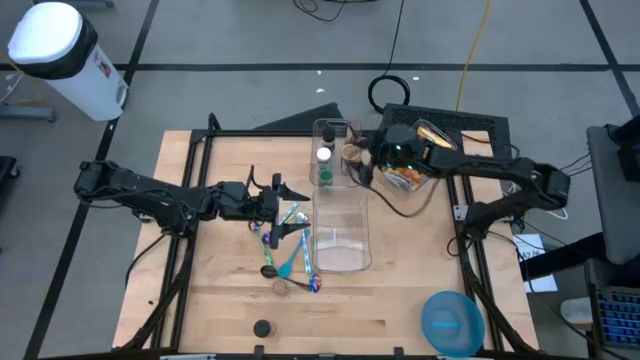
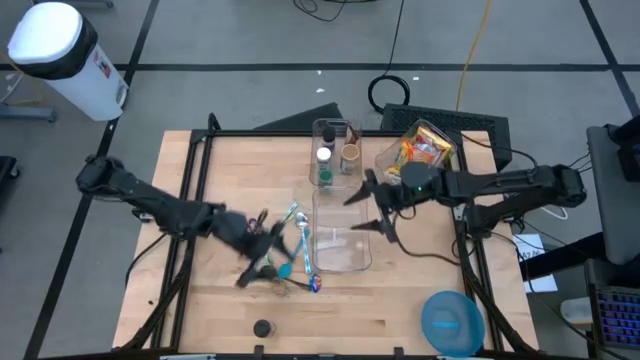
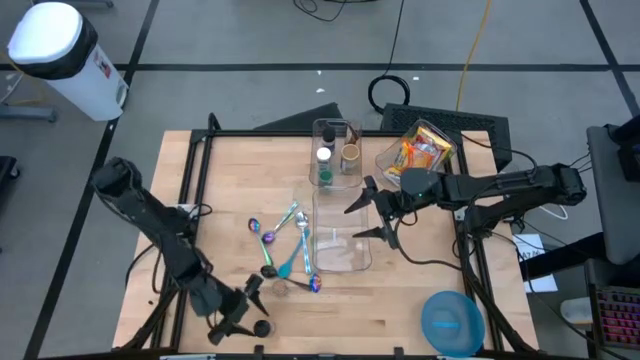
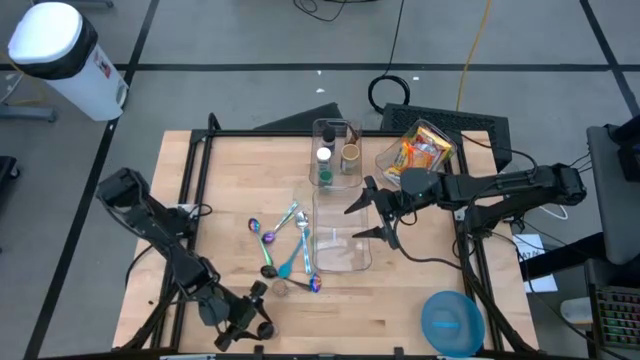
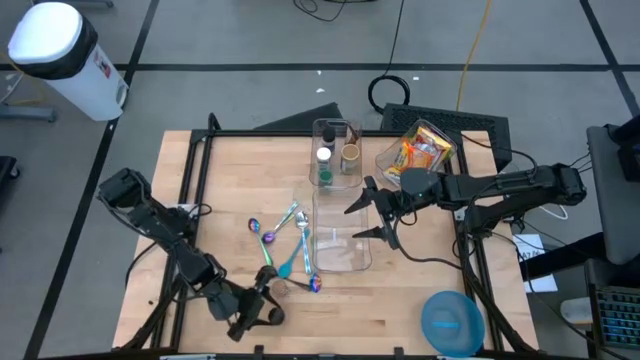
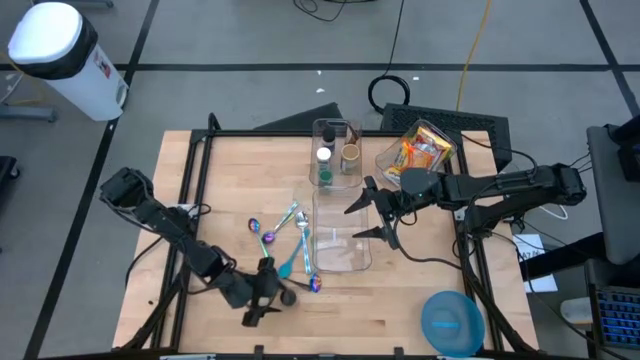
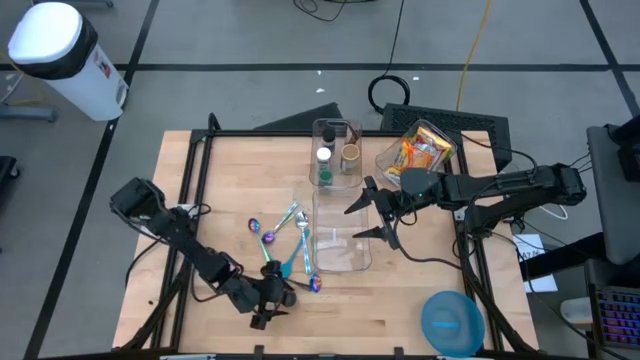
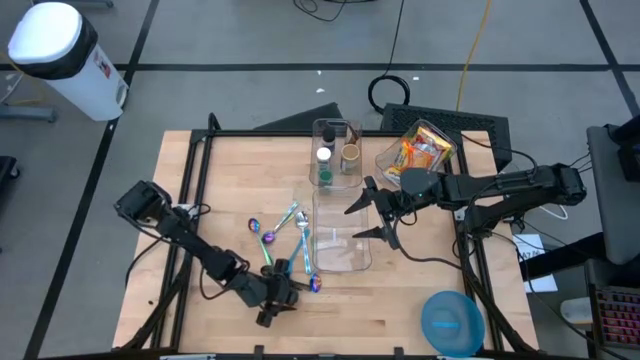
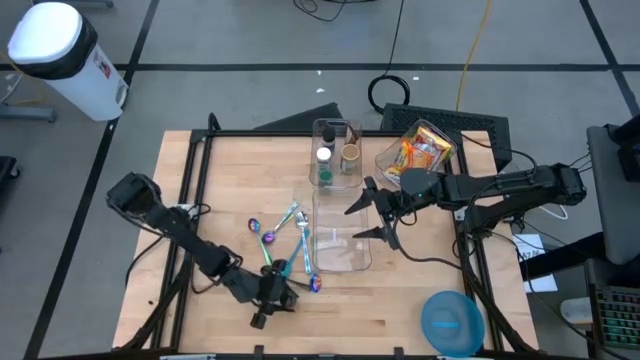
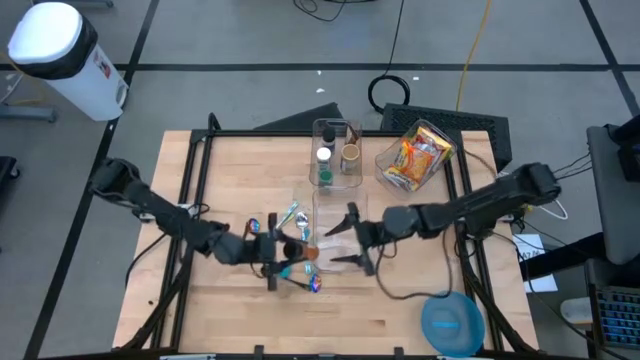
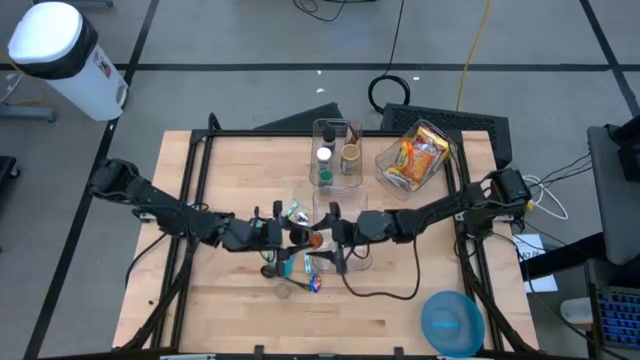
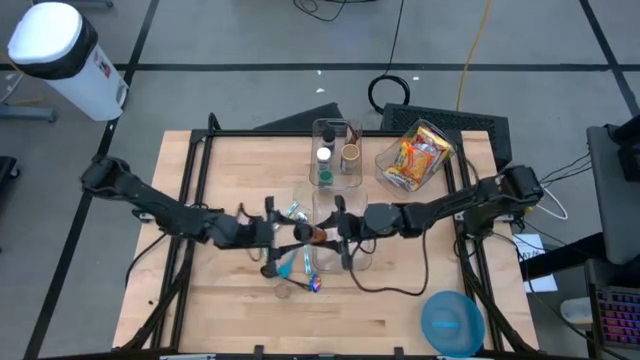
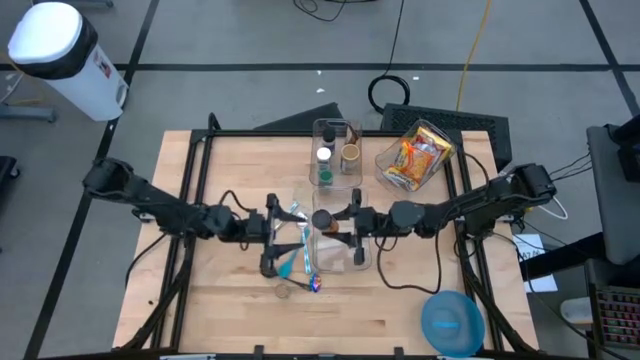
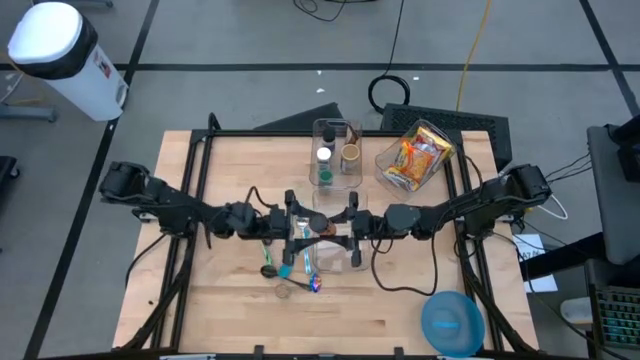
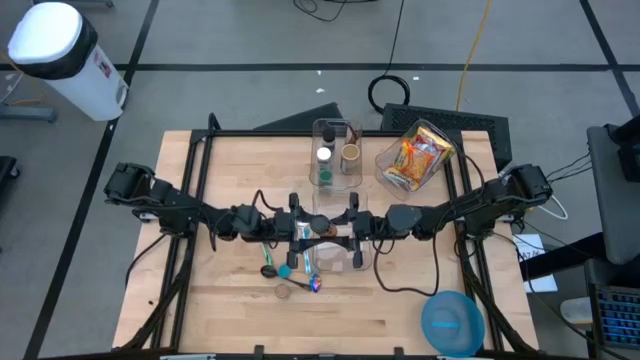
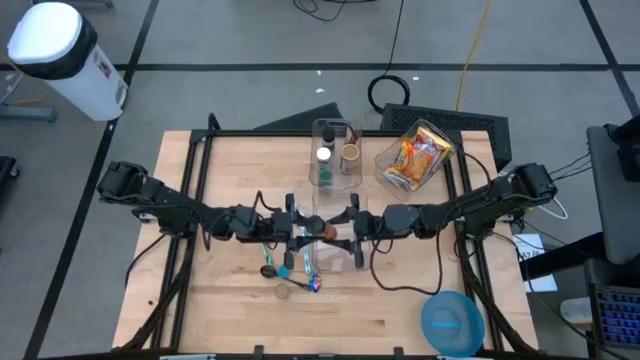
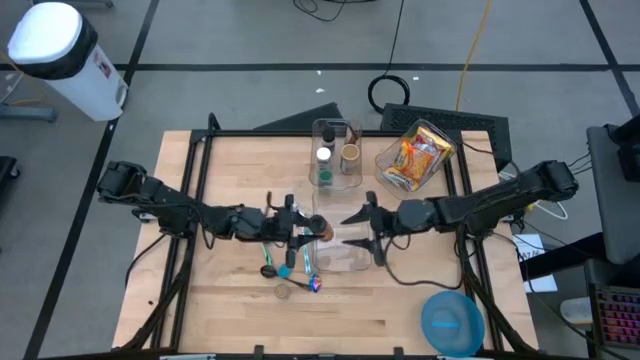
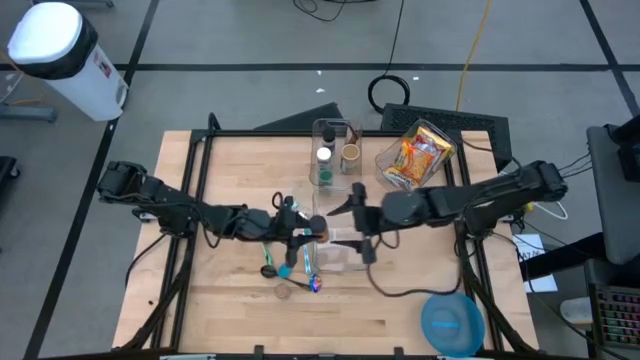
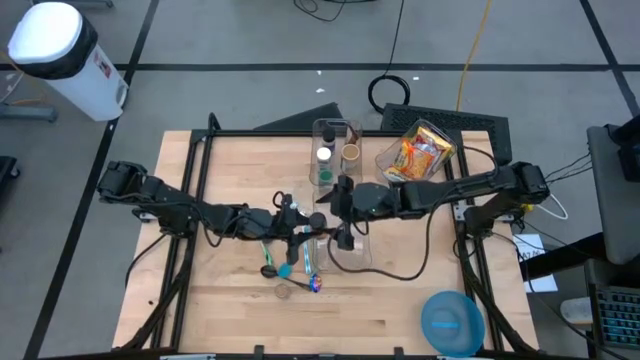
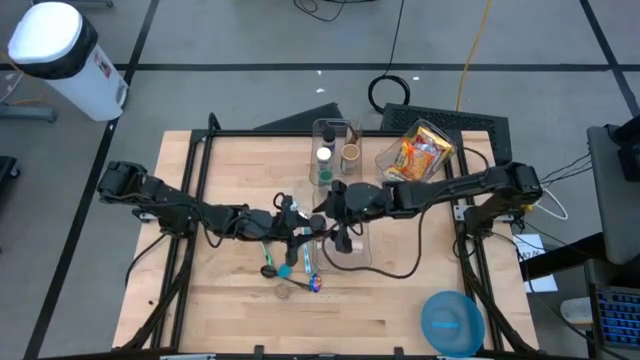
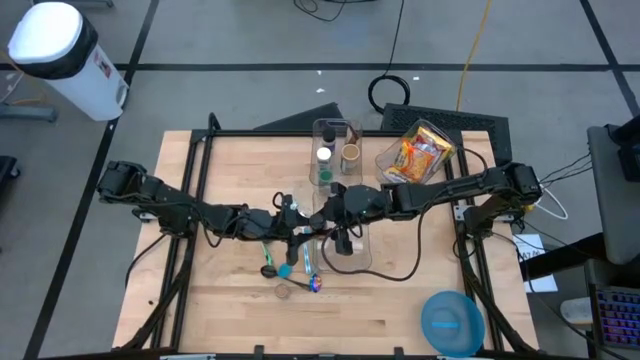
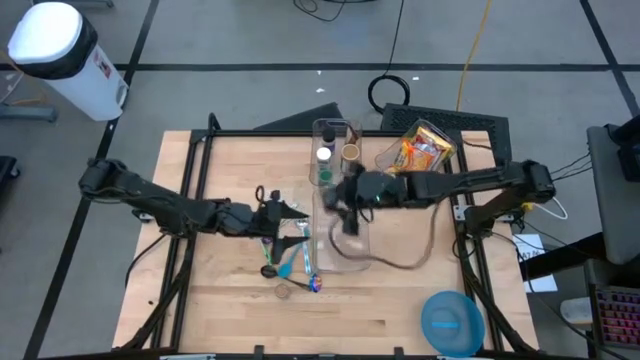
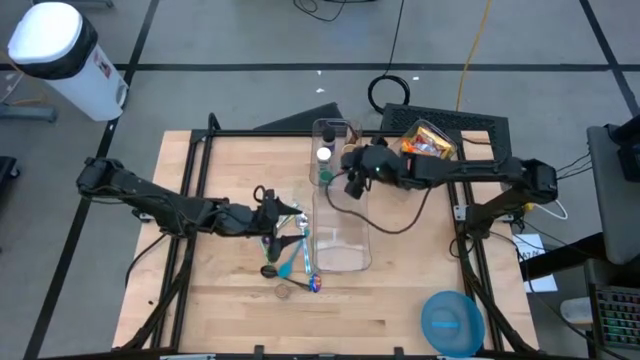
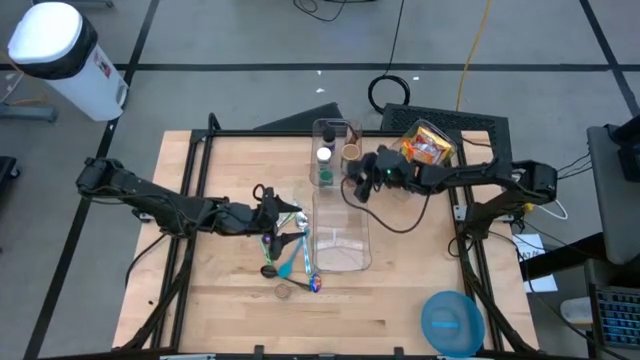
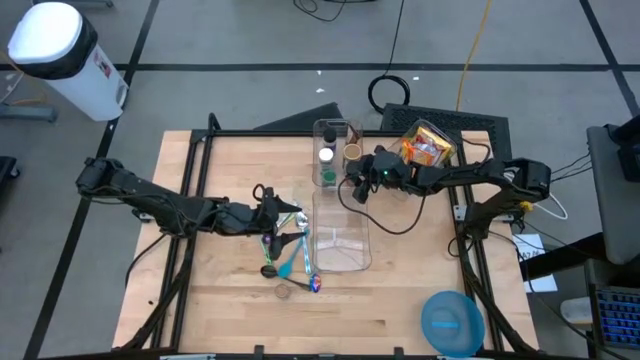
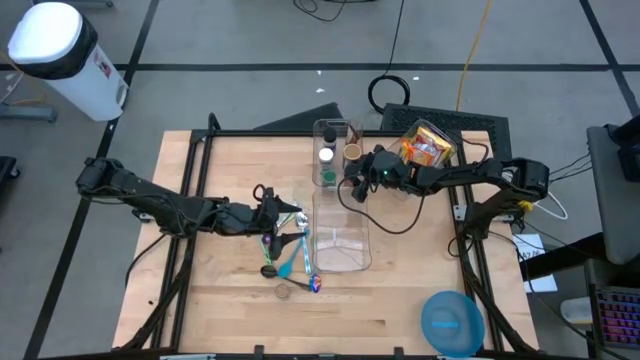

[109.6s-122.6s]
Task: Pick & Place Food Item
Put the orange spice bottle into the top left transparent bin

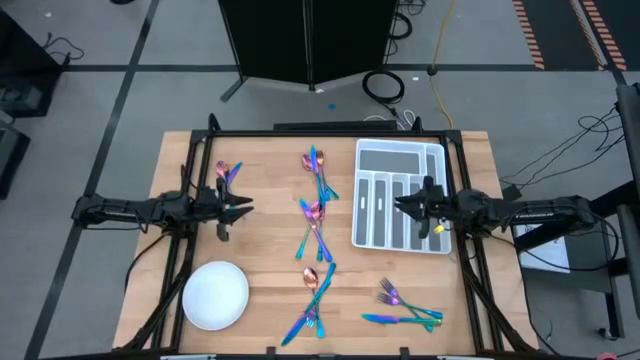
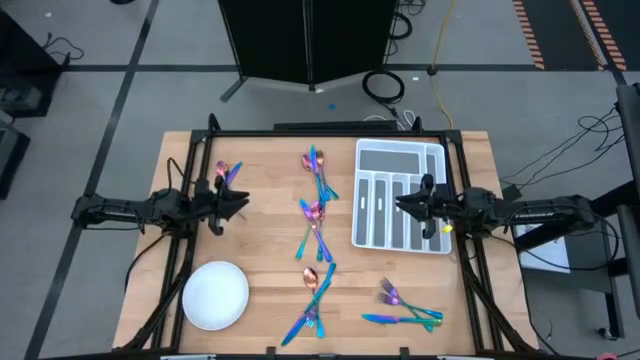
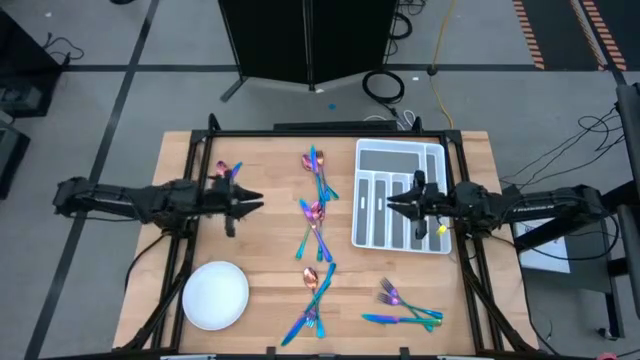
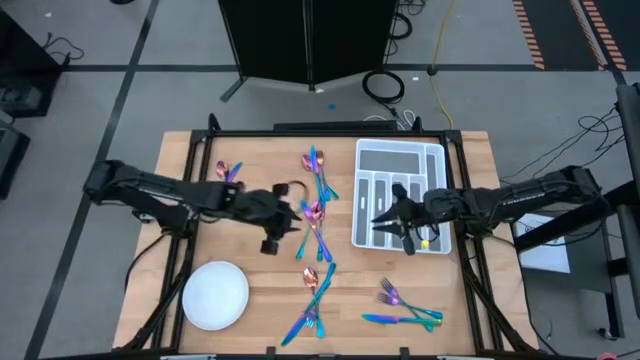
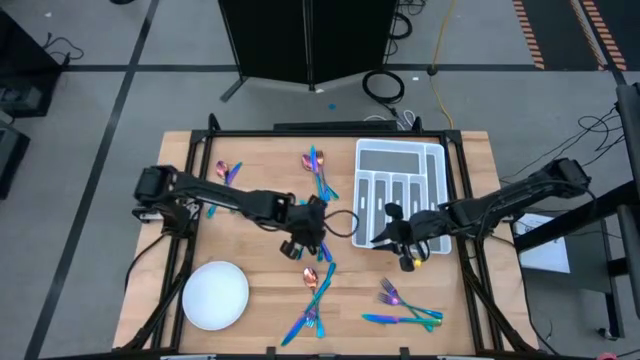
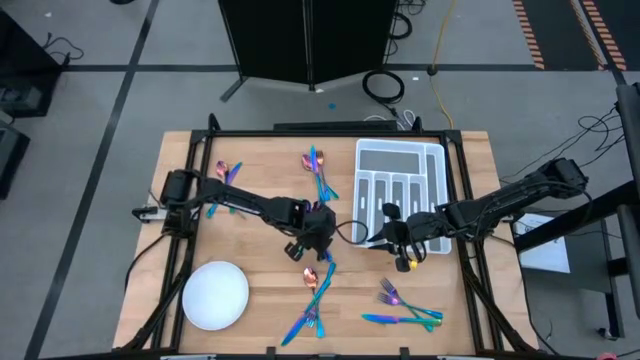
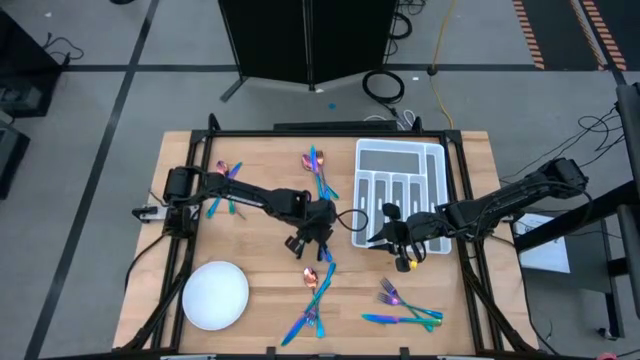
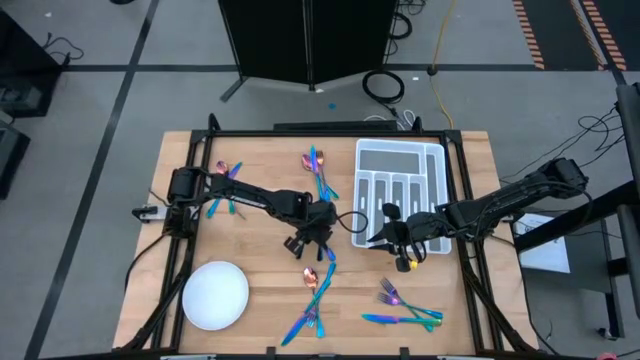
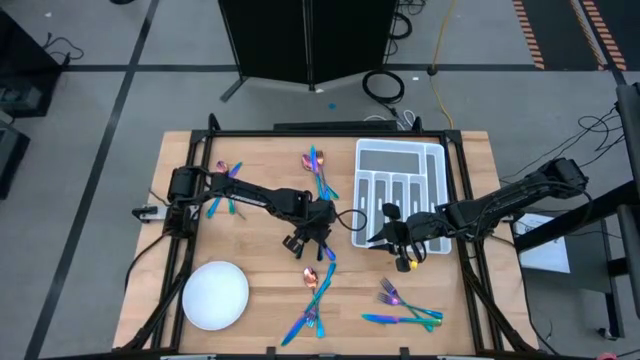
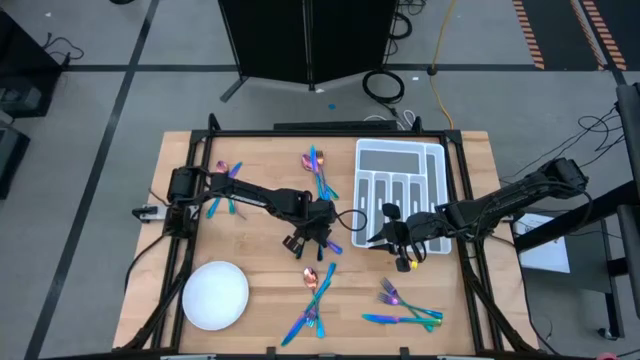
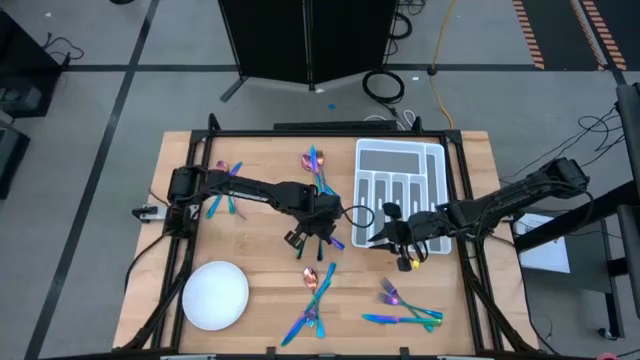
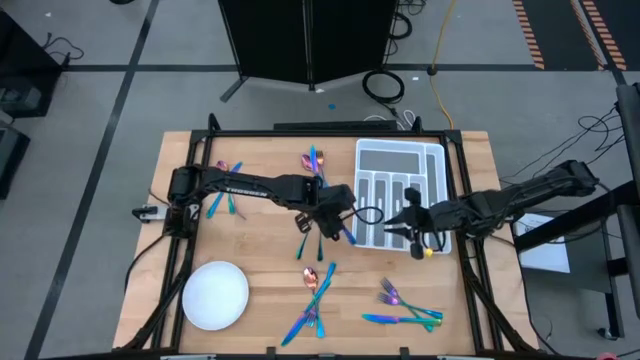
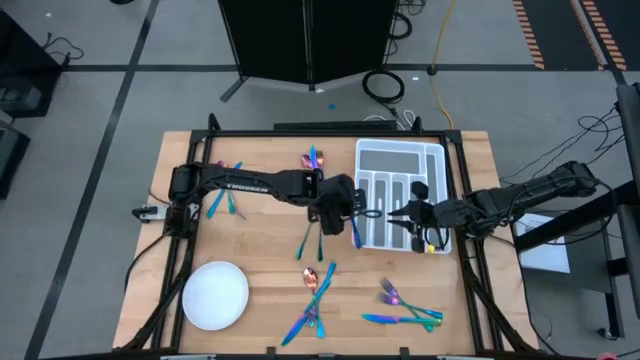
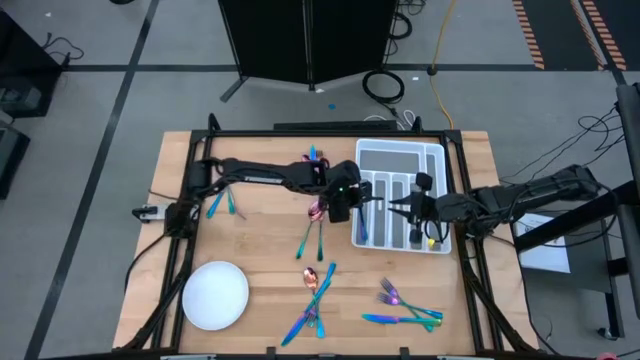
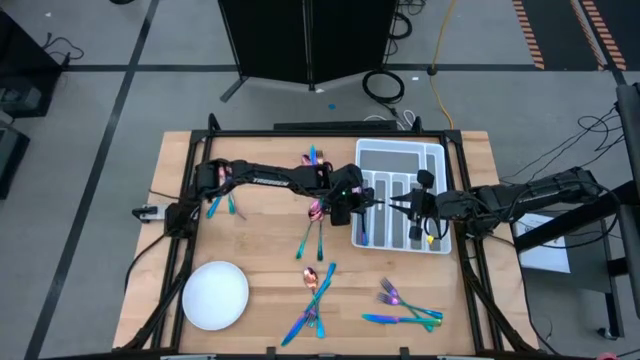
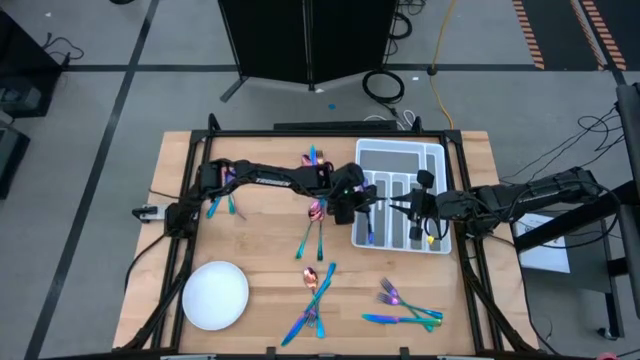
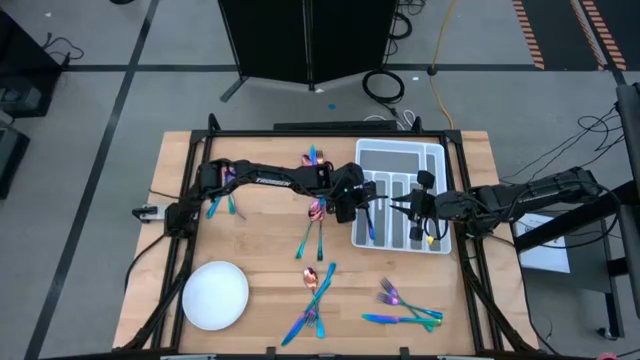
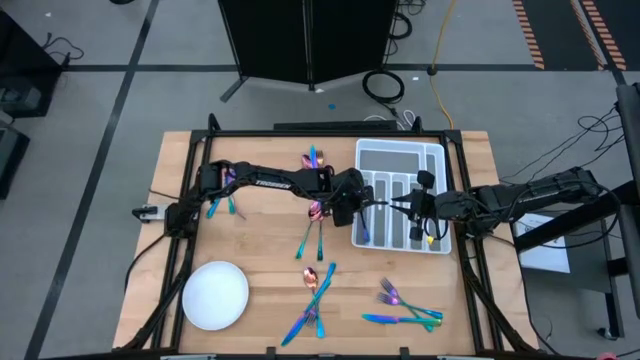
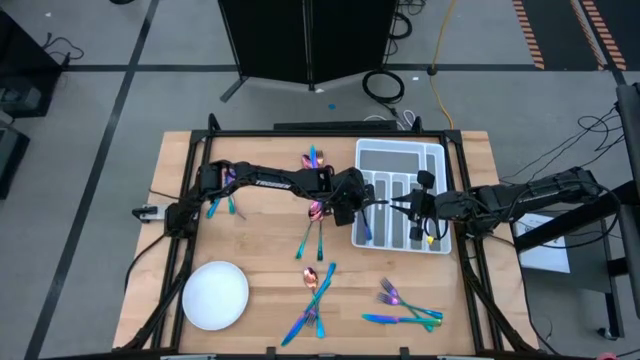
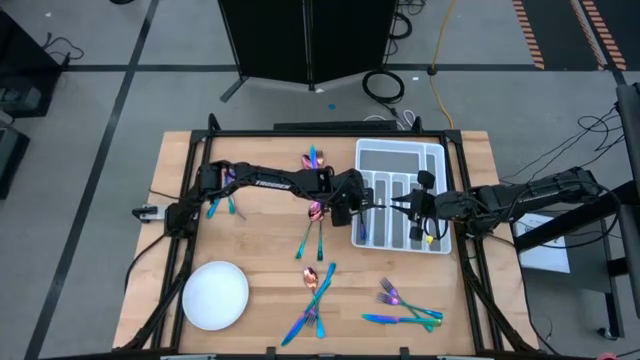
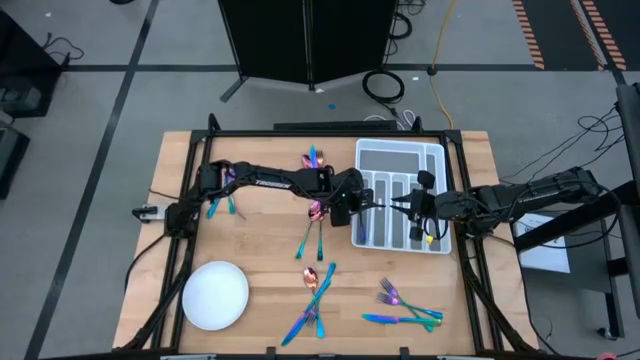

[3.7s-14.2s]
Task: Sort silverware
Put the blue knife into the utensil organizer
